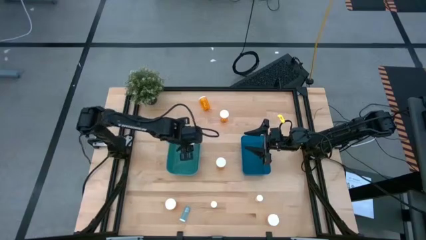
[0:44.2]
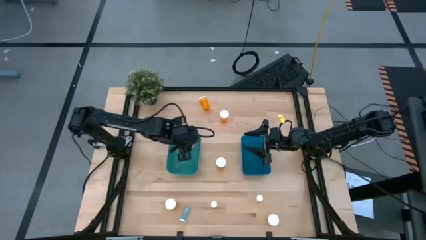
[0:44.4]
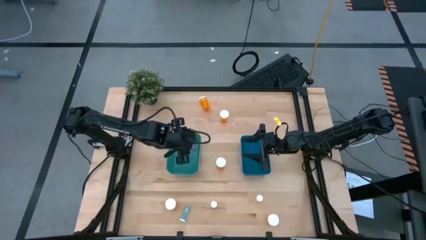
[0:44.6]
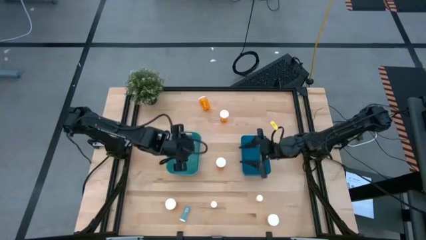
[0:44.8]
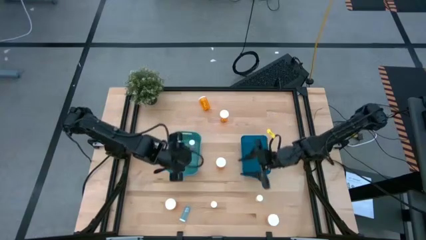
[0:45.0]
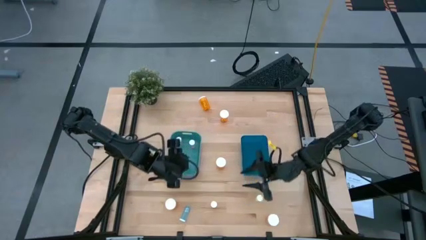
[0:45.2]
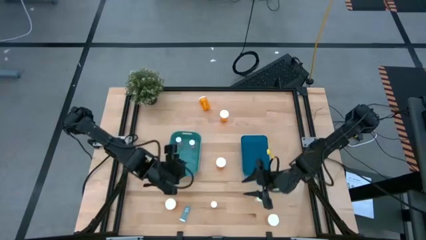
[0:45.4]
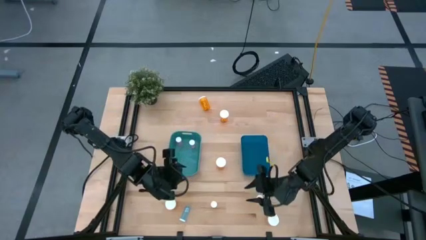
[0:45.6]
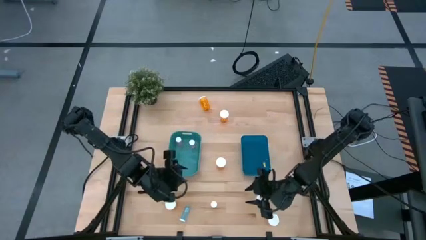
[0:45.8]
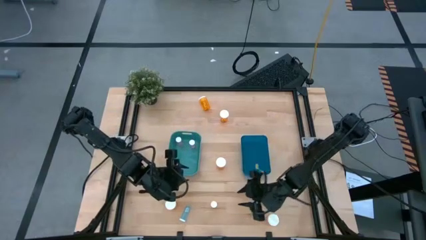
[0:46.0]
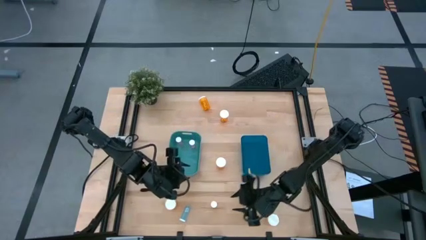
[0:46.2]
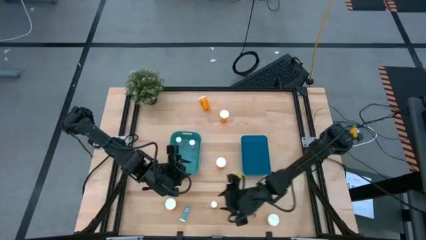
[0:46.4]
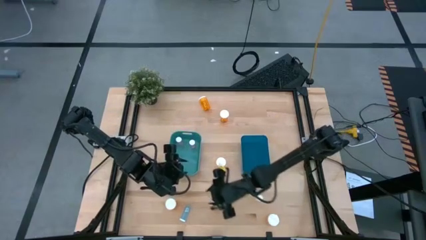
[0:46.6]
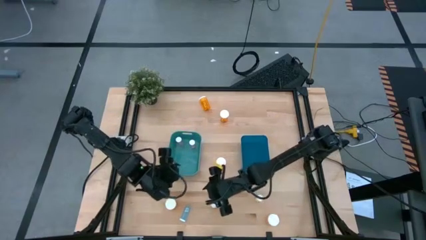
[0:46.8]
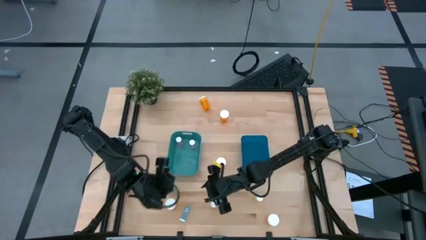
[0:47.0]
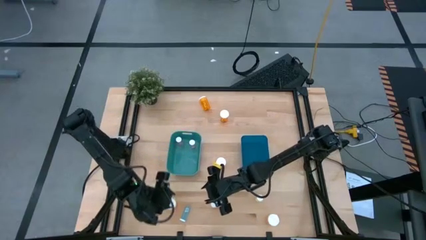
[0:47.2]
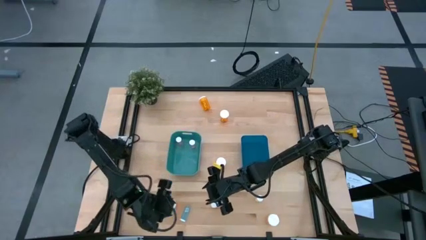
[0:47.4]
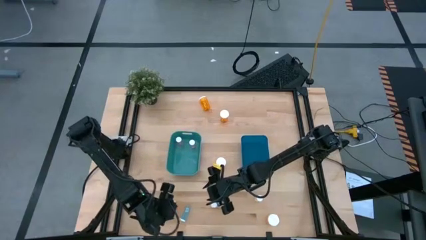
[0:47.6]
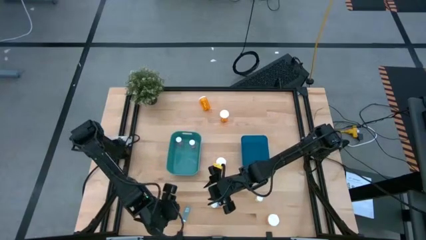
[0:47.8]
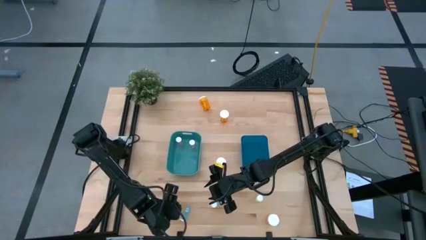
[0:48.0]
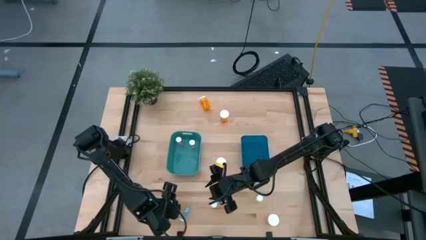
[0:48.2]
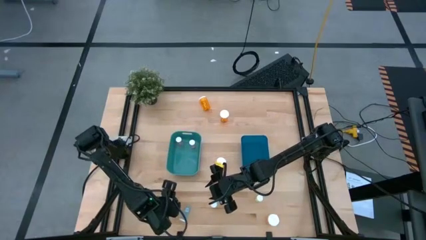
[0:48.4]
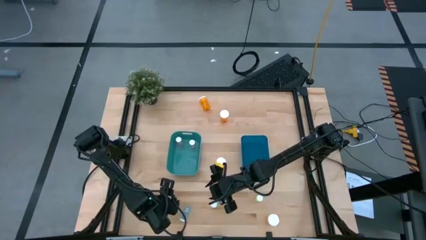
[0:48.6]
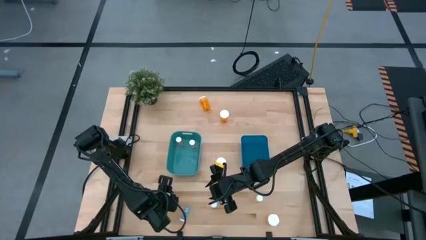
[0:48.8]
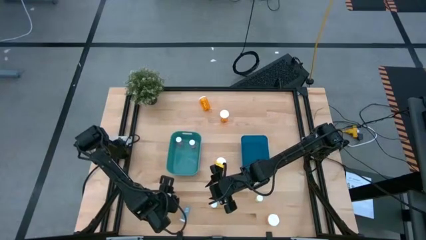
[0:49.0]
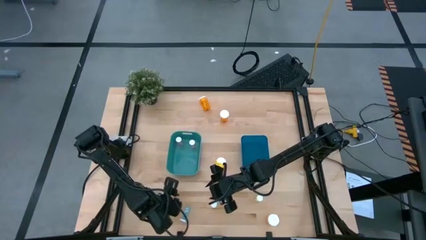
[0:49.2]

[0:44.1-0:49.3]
Task: Pick and place medicine bottles into bin by pill shape (circle, oval)
Adjust the bottom left large orange pill bottle

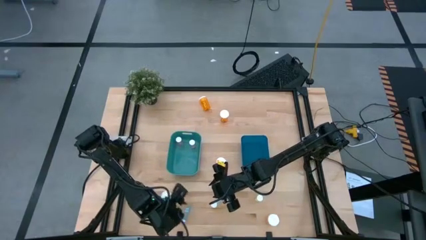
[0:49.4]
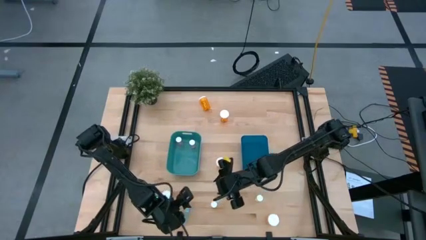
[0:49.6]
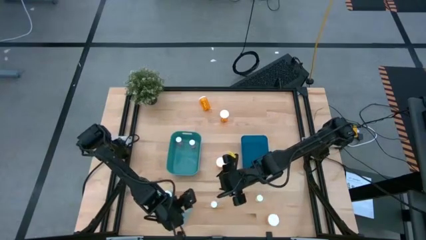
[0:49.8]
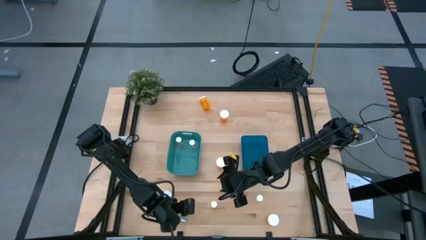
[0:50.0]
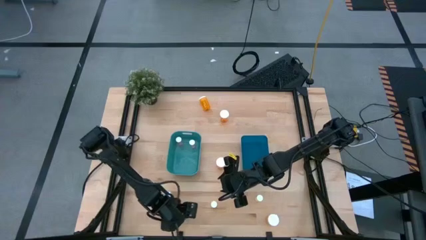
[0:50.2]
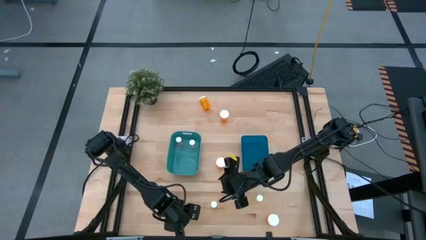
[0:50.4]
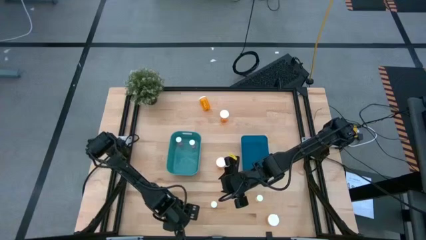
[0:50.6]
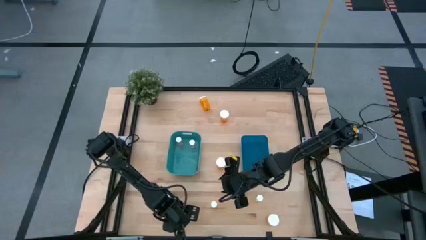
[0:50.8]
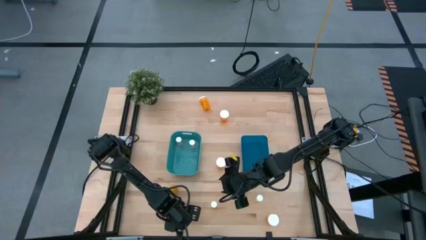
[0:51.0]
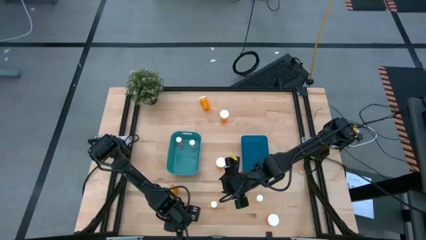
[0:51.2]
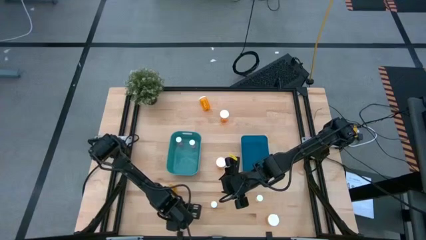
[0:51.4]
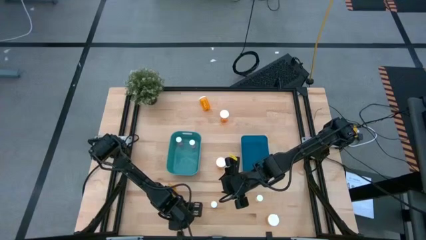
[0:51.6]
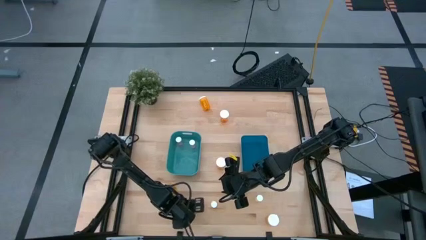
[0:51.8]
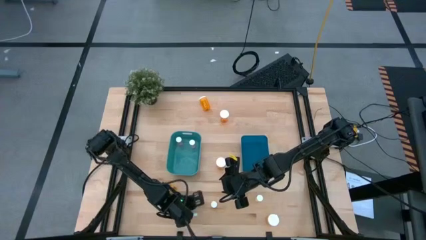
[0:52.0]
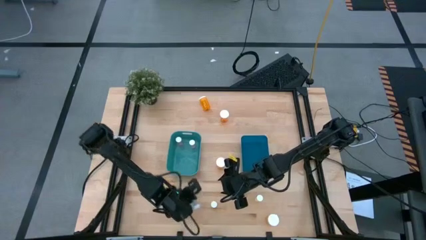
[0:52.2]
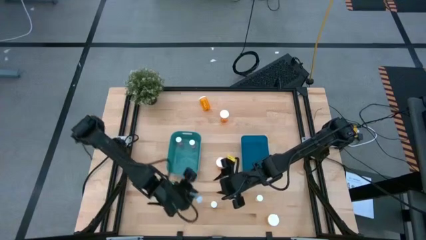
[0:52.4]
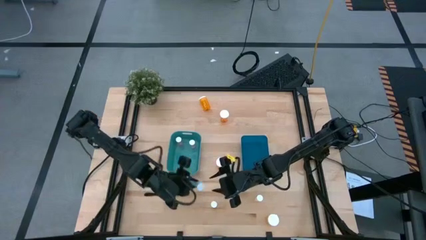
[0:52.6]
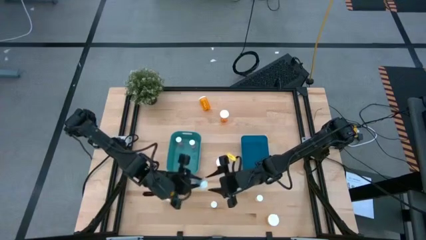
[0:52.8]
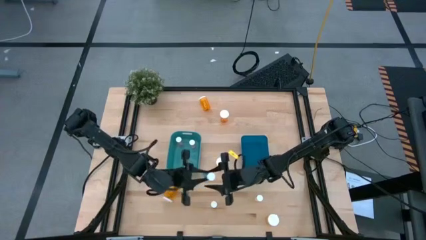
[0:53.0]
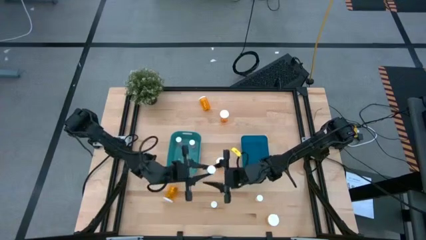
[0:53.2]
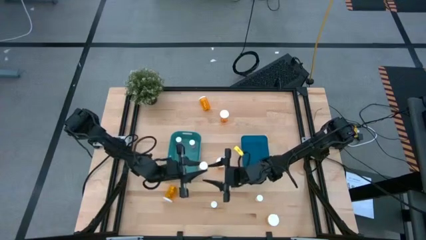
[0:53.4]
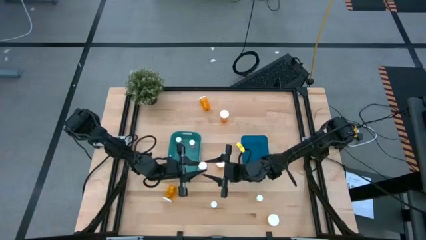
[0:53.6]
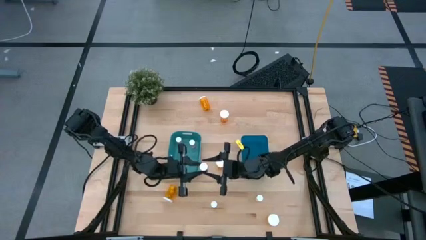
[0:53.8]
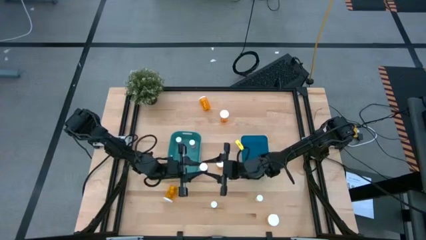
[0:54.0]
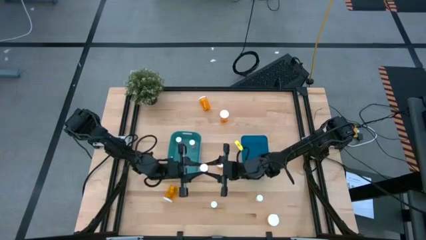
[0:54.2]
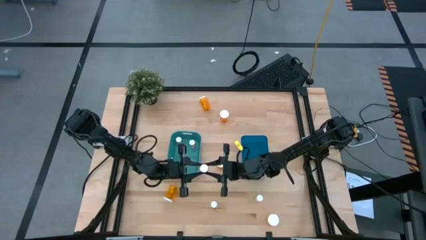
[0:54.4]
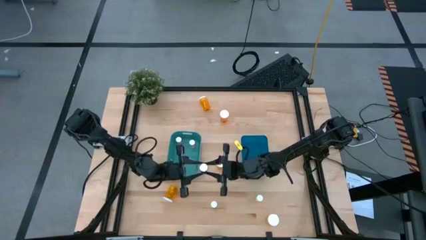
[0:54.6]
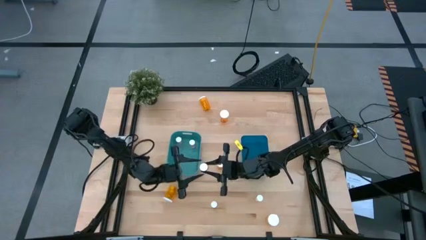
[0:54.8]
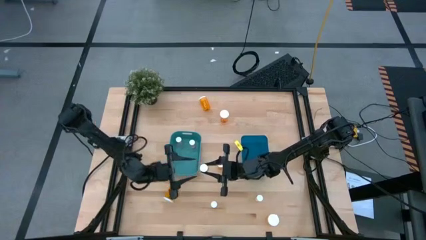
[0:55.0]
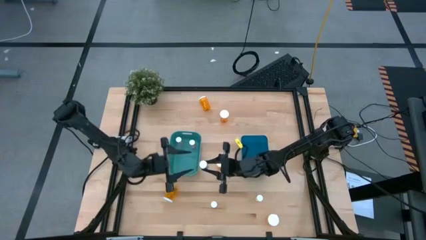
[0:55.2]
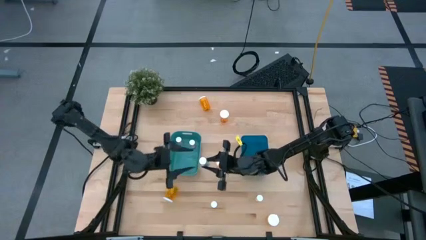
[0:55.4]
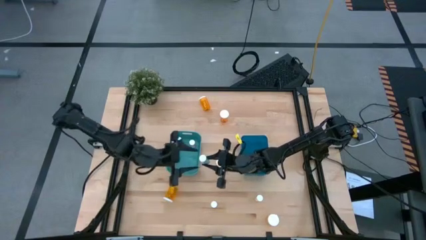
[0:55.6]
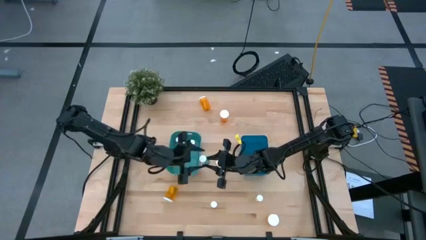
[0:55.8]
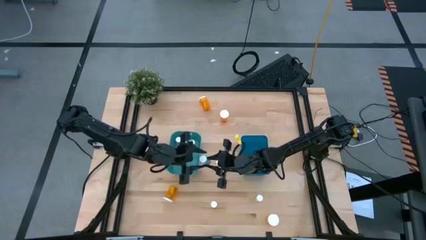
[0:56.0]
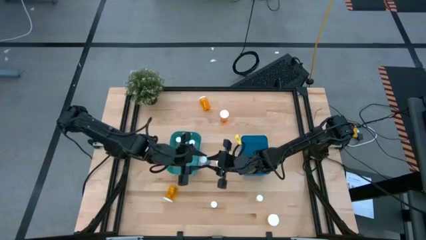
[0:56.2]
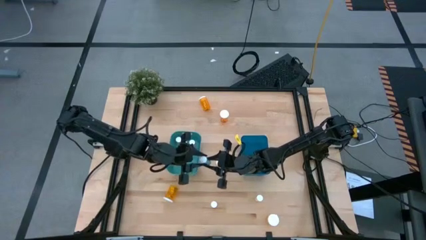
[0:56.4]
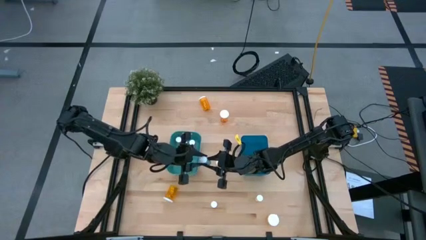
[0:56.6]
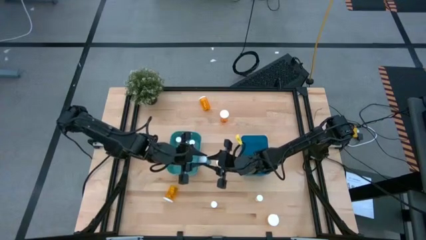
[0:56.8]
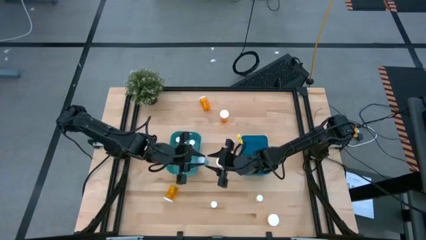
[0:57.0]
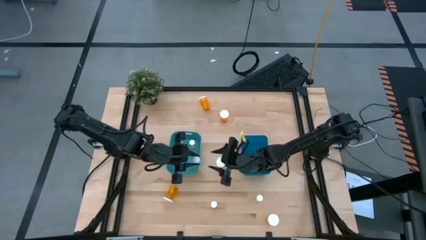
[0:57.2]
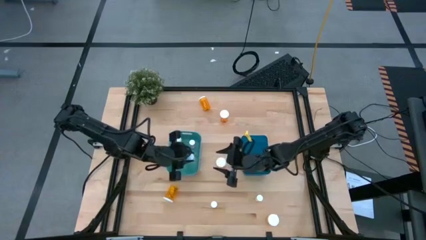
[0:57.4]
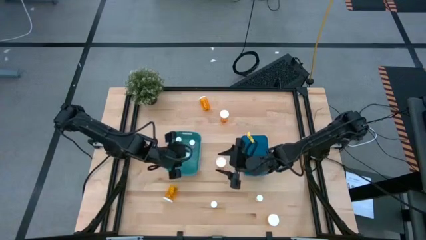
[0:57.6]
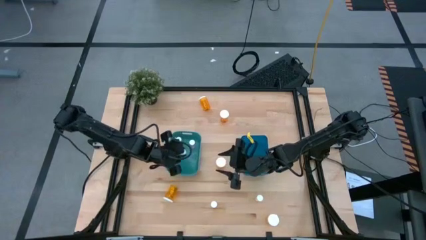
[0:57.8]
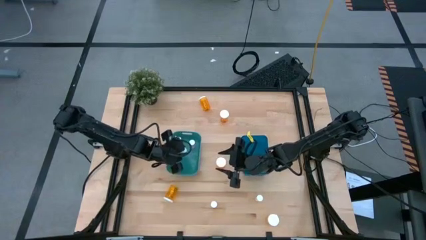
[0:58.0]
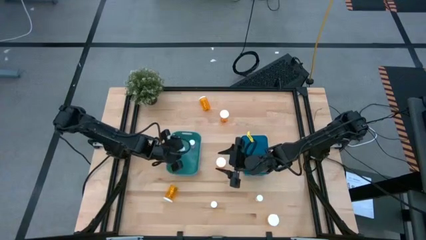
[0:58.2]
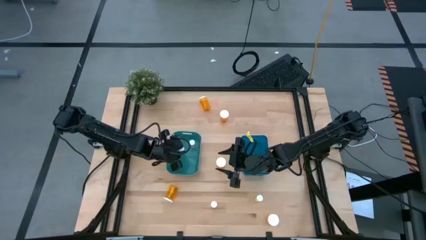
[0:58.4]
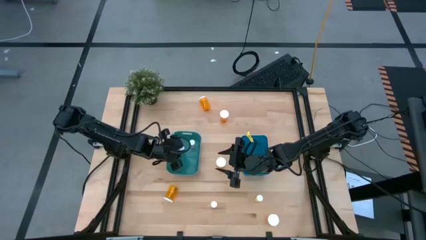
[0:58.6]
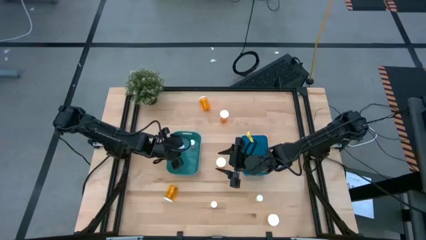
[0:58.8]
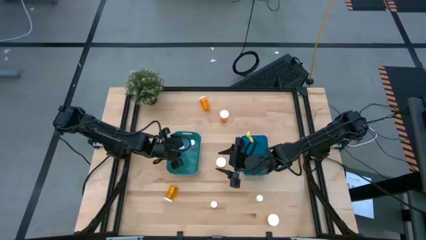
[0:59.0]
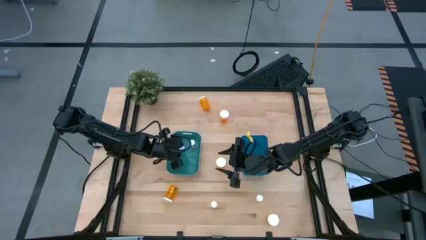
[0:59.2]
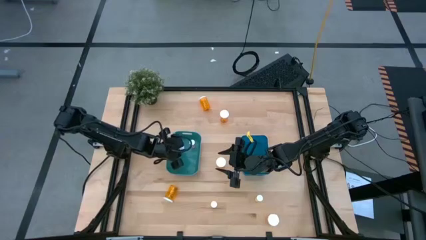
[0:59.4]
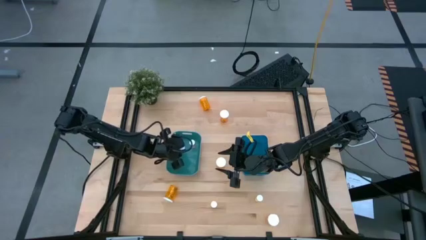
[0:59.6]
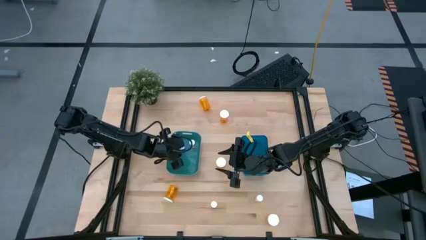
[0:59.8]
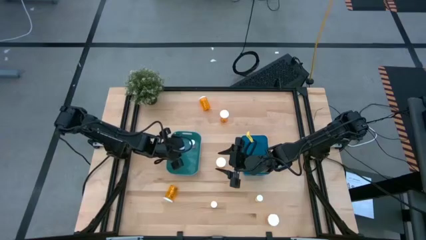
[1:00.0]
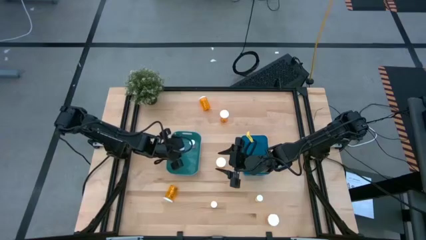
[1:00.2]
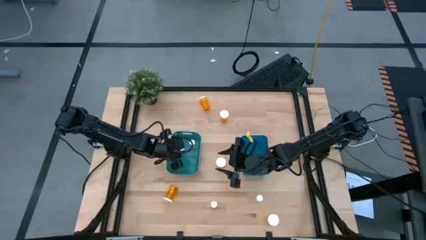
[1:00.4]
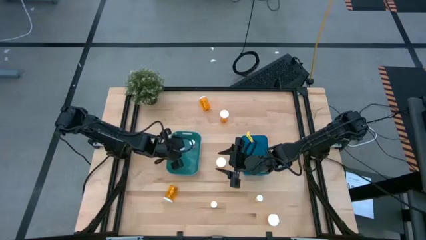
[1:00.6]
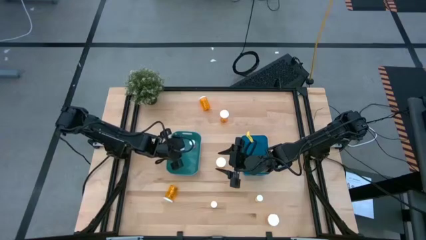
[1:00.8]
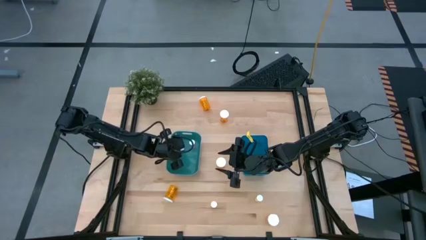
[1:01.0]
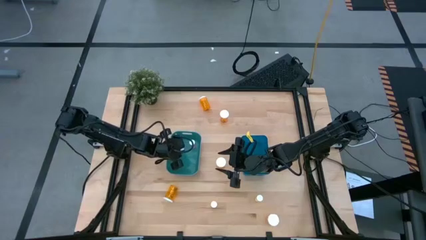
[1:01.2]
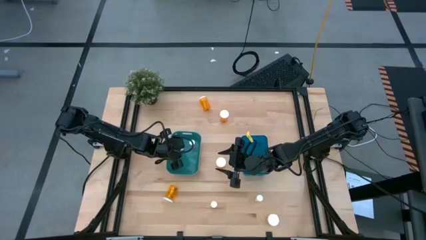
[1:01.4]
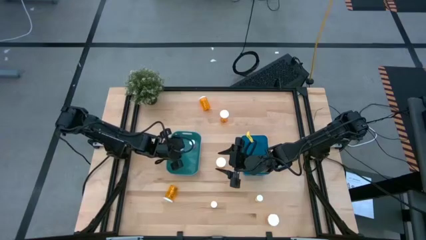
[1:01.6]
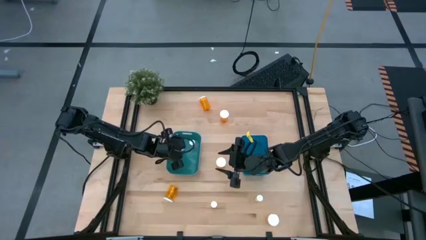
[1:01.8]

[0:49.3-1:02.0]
Put the small blue pill bottle into the green bin
